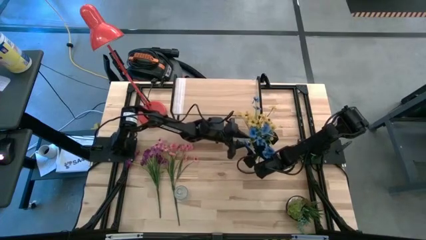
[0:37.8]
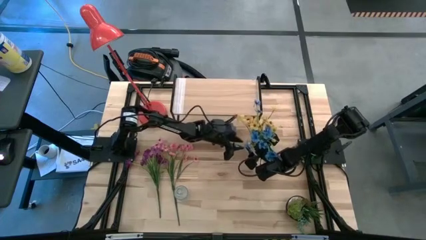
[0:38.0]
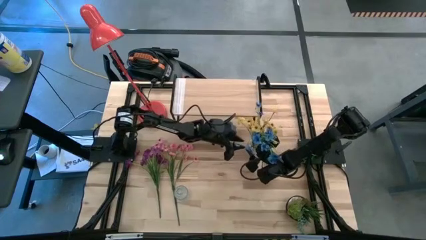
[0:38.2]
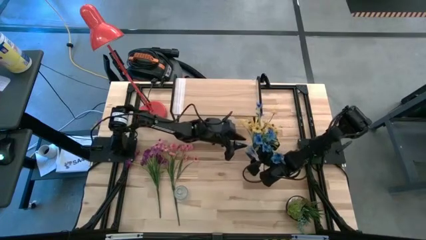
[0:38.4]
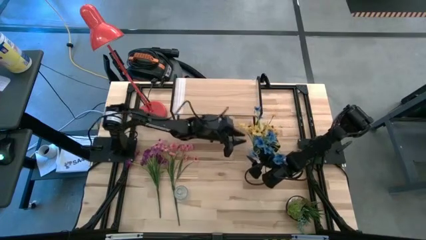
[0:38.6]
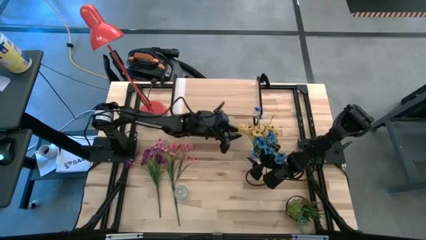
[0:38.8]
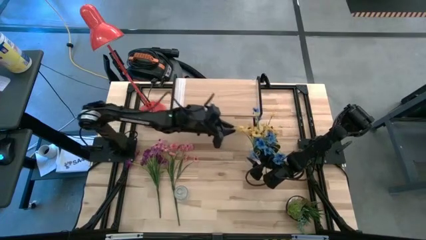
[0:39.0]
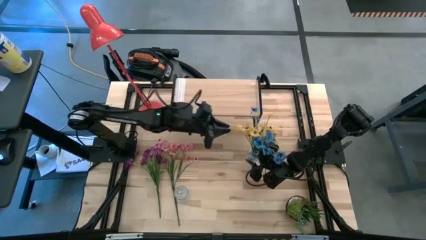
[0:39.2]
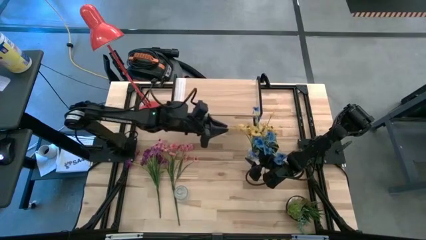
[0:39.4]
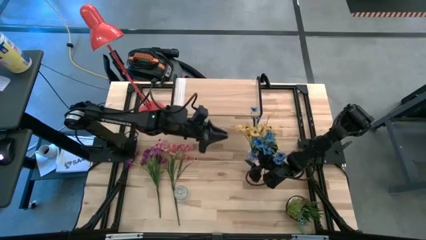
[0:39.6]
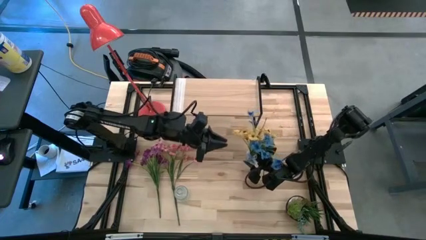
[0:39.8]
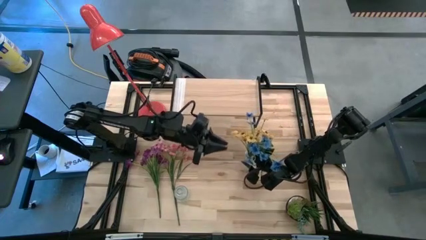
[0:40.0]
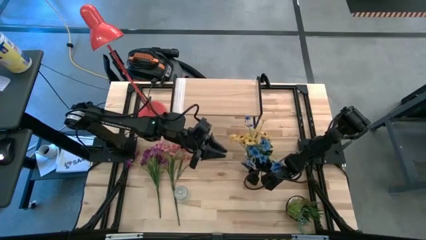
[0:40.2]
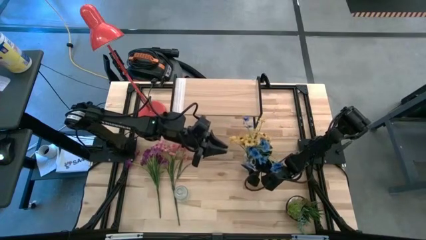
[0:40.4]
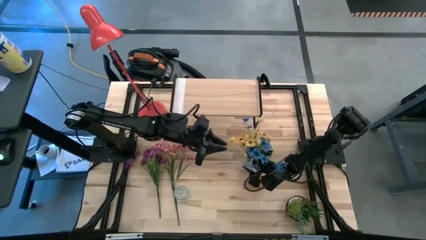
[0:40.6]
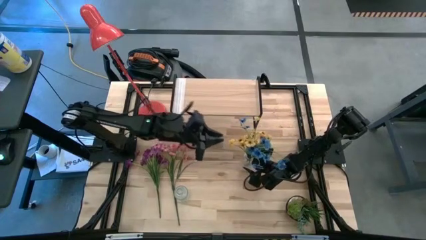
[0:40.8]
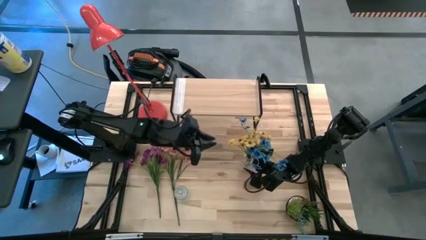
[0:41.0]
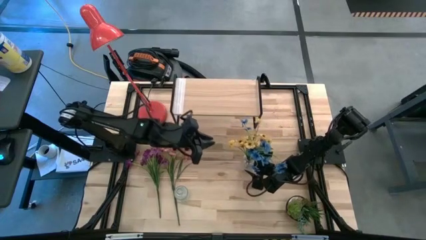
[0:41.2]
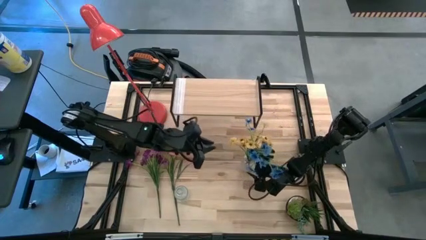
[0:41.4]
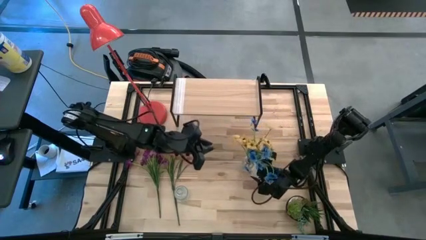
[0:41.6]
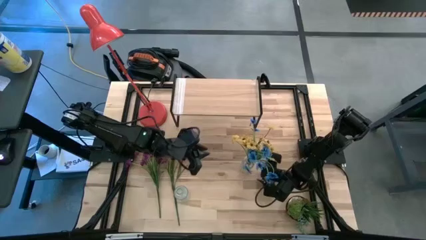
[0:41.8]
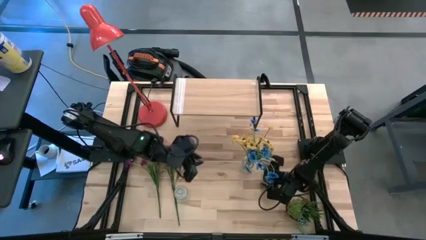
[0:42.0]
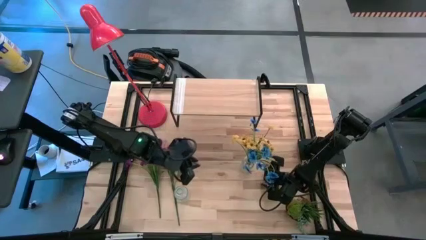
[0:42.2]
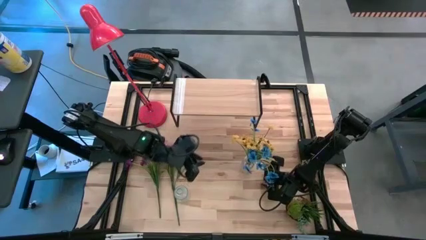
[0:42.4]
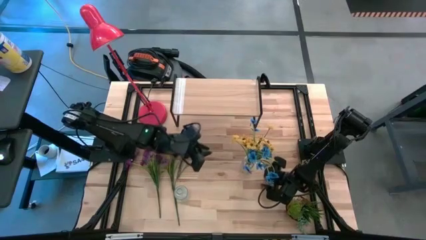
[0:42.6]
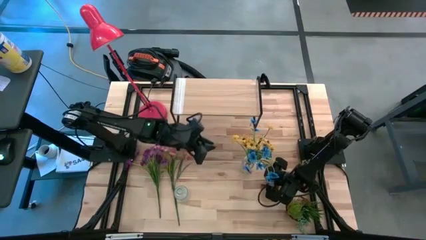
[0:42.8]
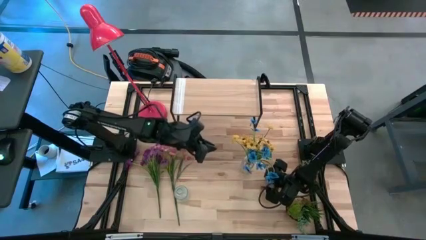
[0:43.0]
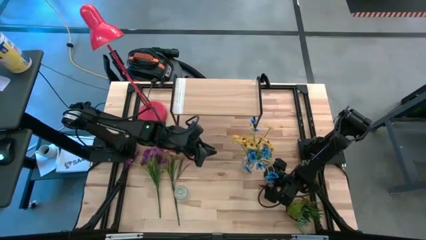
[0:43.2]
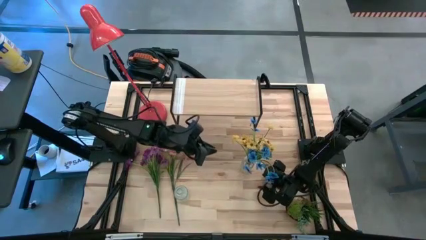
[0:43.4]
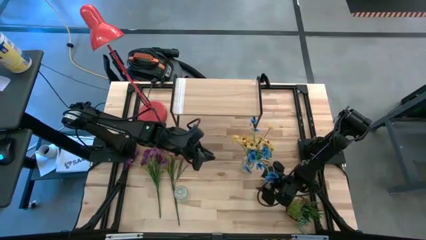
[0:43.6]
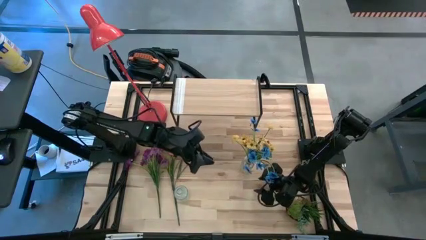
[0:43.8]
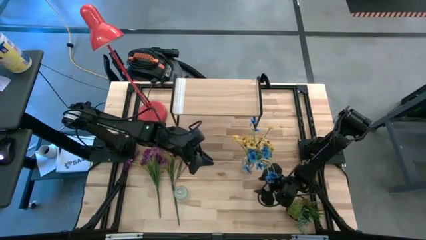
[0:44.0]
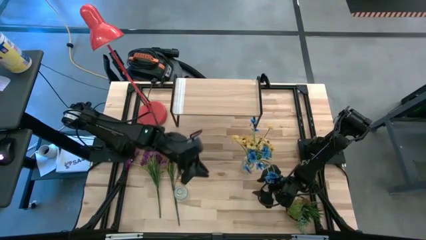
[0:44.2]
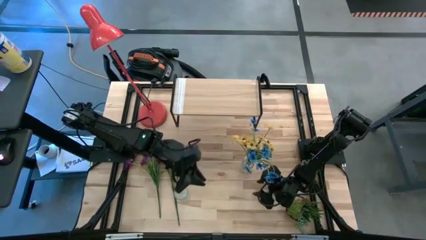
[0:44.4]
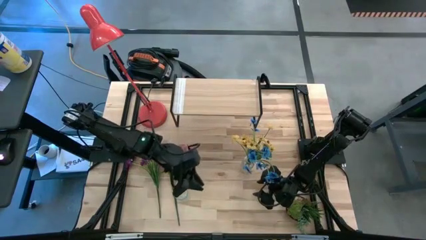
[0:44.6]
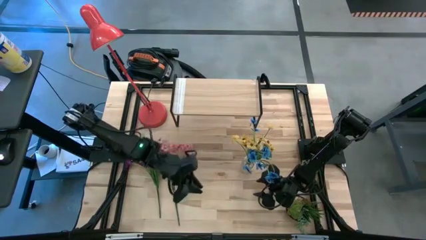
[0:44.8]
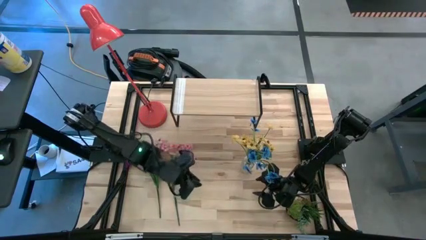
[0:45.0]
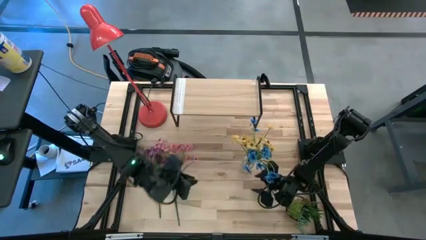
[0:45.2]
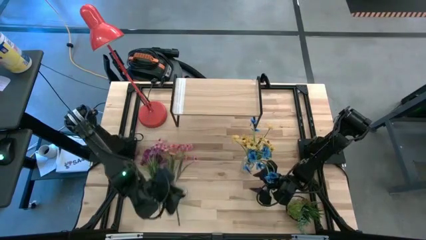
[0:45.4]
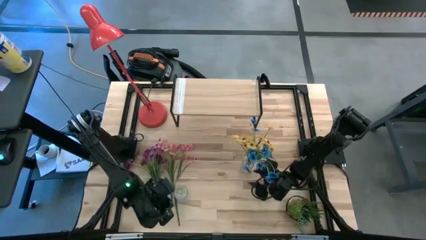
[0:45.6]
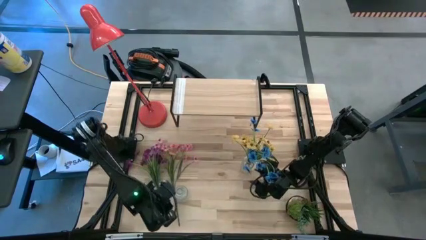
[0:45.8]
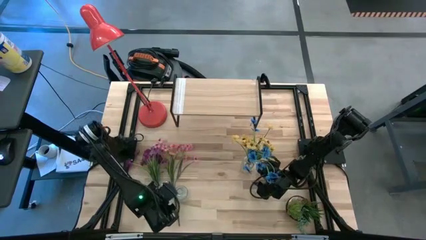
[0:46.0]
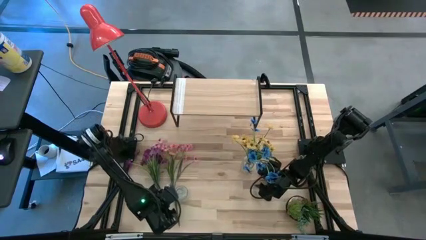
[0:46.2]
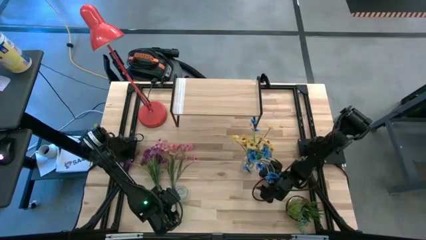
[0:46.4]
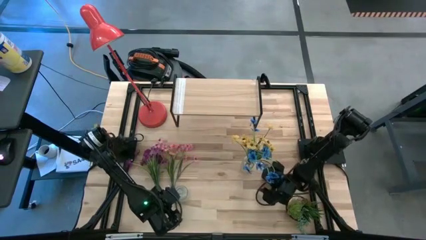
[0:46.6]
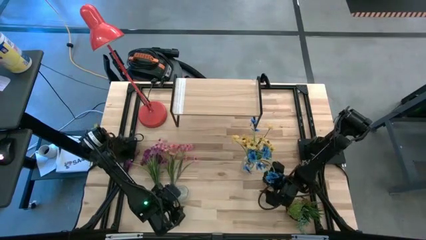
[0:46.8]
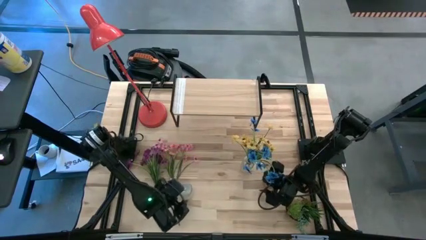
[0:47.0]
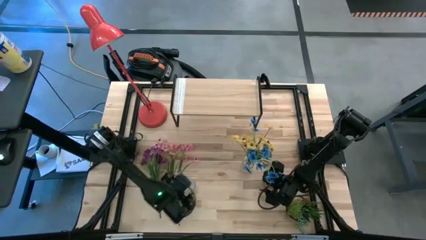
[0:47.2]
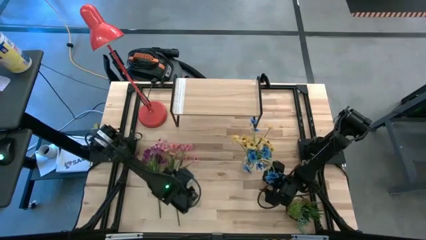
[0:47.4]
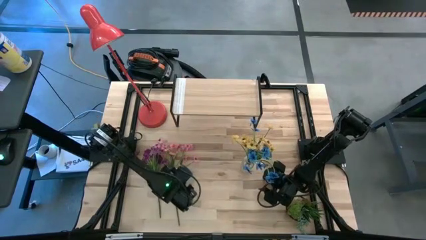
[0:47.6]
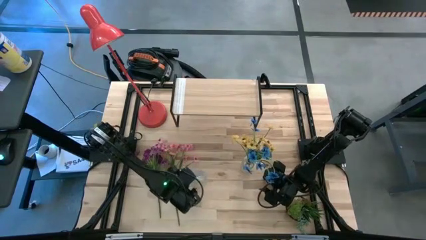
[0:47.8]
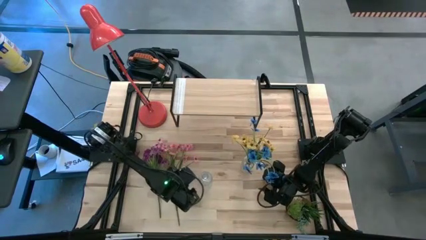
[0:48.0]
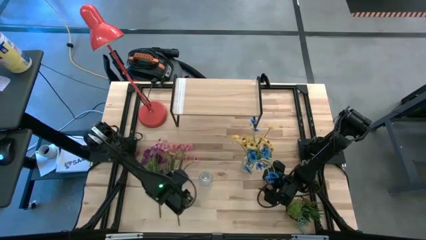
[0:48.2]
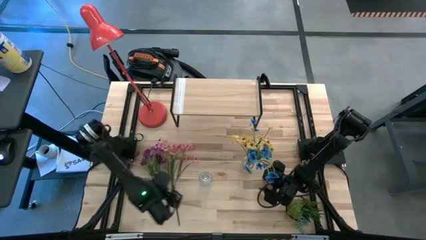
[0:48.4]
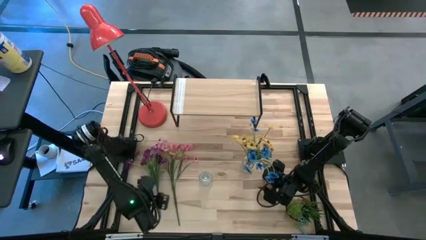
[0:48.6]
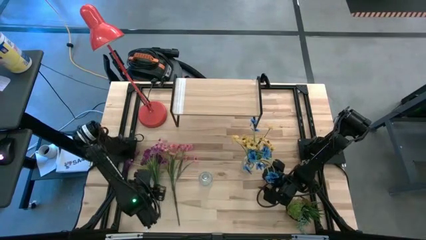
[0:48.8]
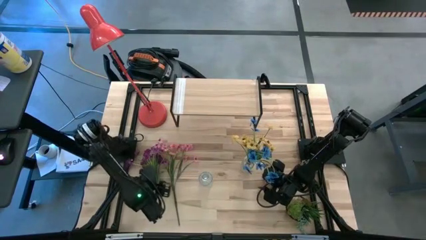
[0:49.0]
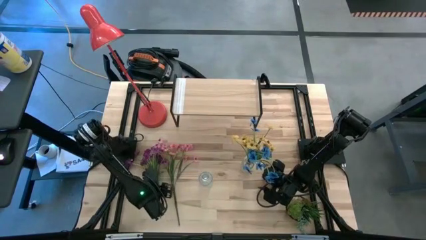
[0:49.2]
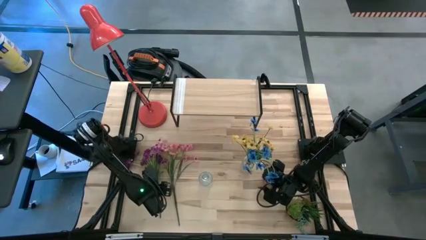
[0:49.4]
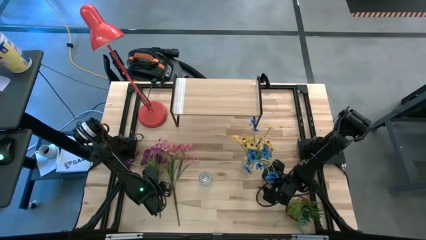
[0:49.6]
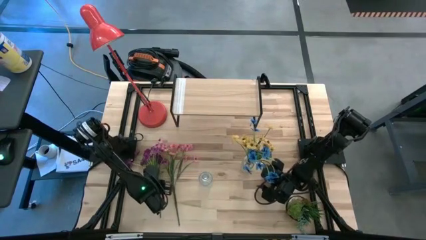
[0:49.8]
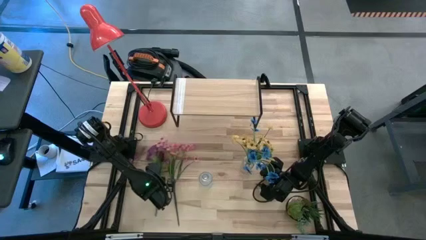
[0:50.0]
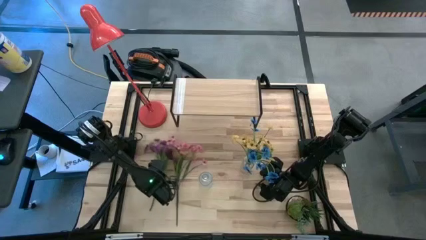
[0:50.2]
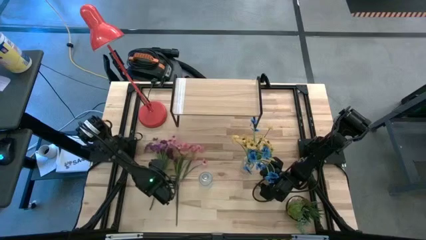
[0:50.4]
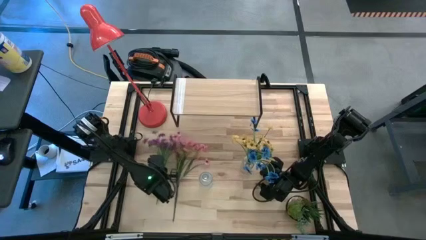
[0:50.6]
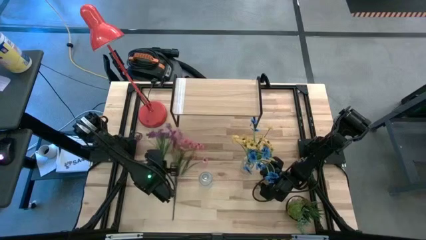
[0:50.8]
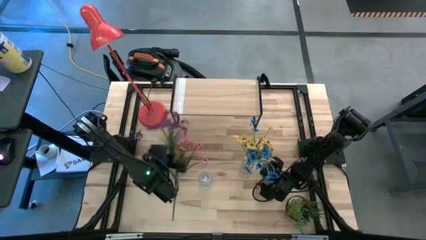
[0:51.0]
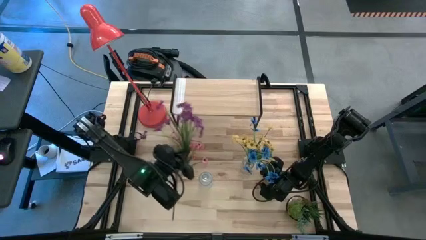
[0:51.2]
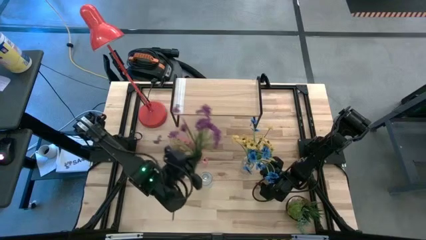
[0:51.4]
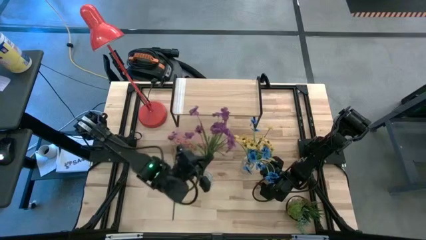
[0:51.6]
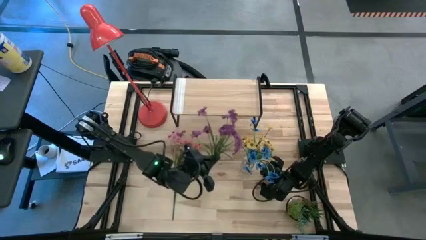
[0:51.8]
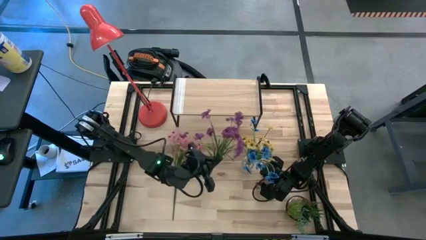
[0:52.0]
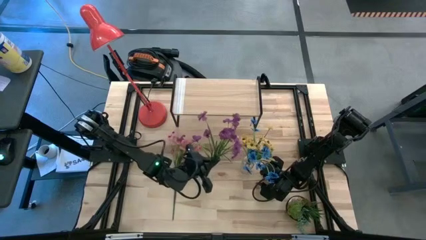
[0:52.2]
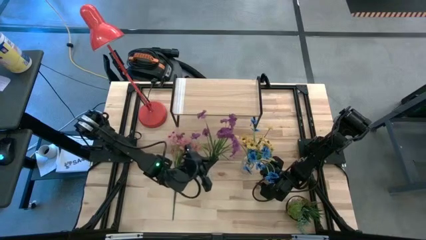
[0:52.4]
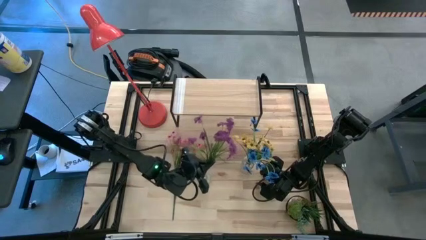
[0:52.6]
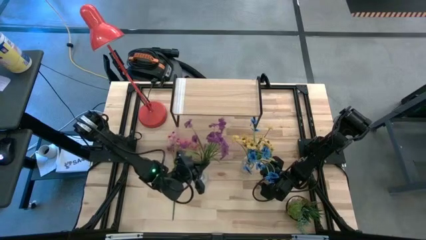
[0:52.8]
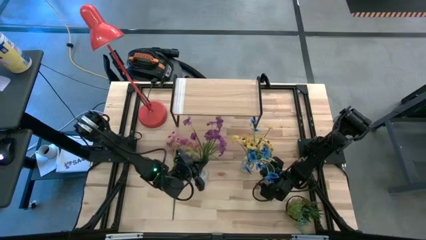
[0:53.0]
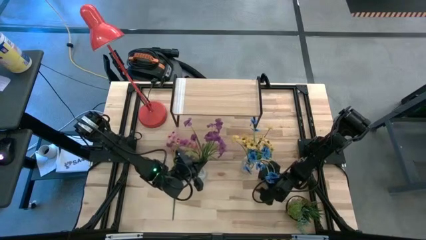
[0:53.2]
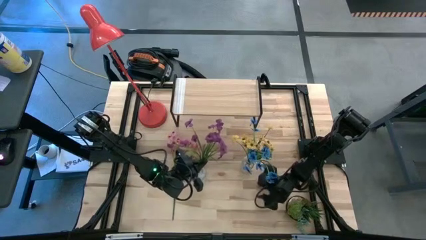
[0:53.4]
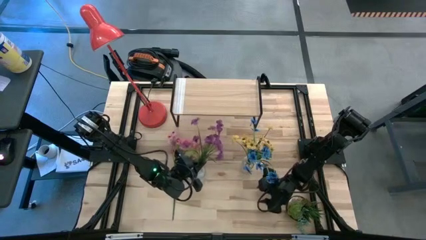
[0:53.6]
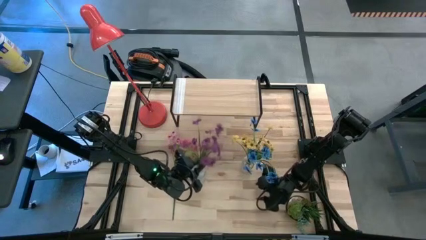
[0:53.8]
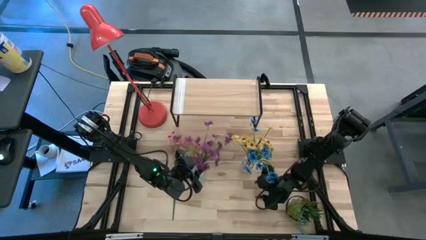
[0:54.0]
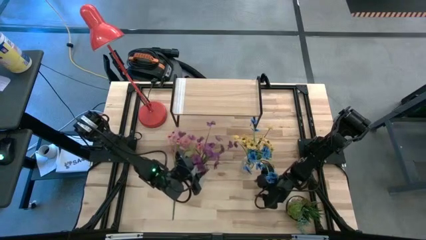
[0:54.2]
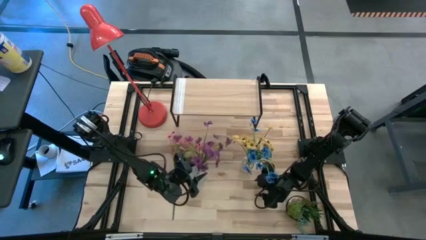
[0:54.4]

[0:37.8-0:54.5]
Task: Pick and place flowers into a vace then onto a shelf
Put the purple flowers into the bottom vase
